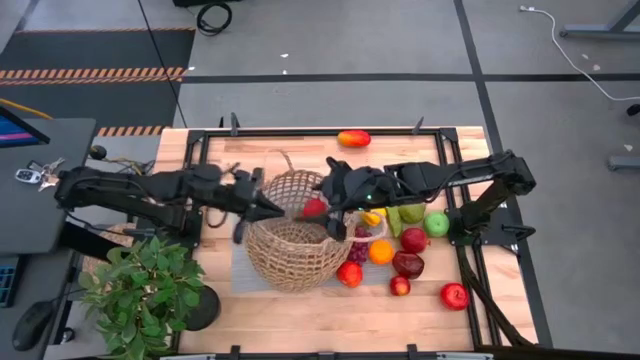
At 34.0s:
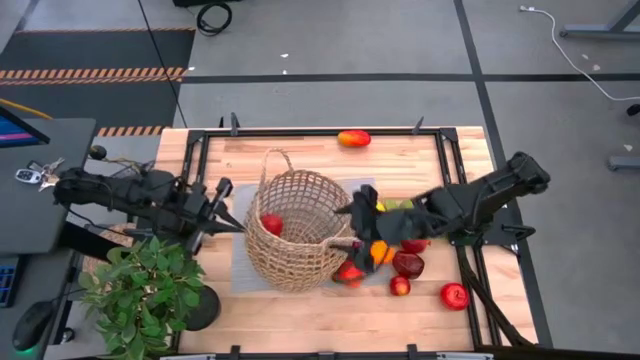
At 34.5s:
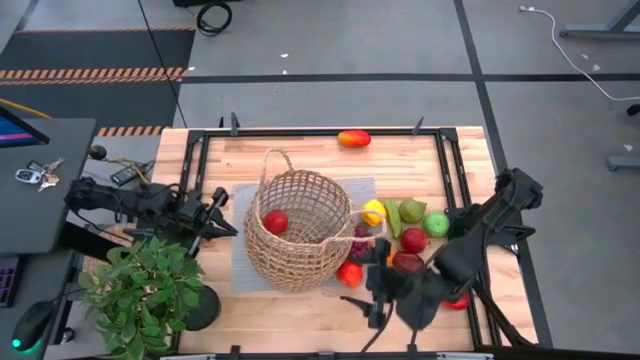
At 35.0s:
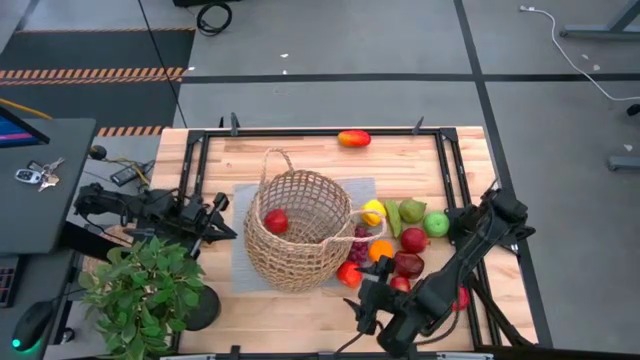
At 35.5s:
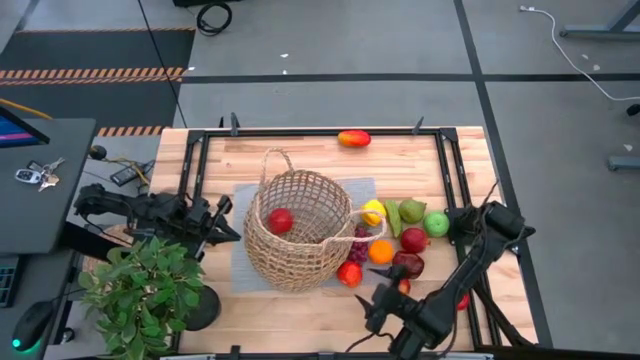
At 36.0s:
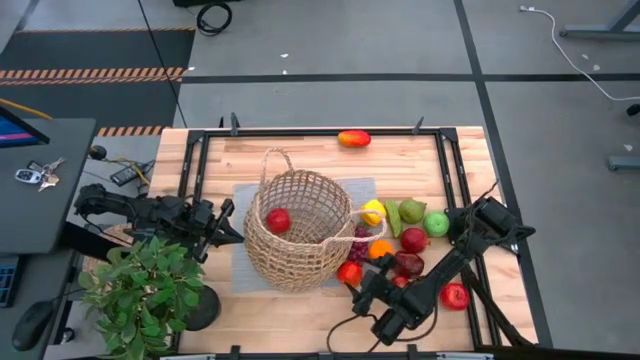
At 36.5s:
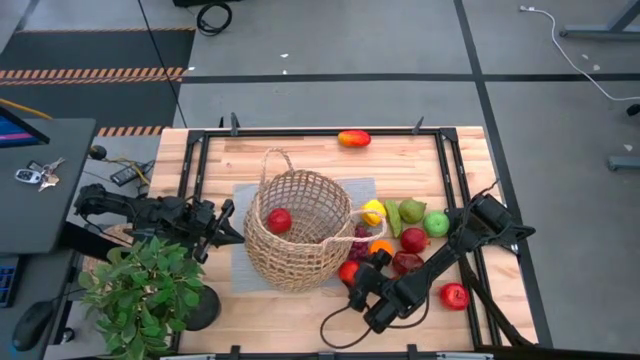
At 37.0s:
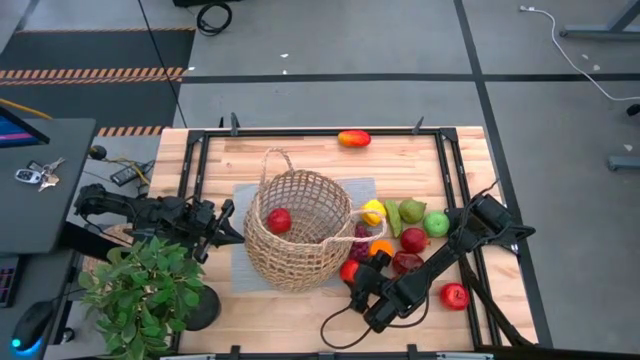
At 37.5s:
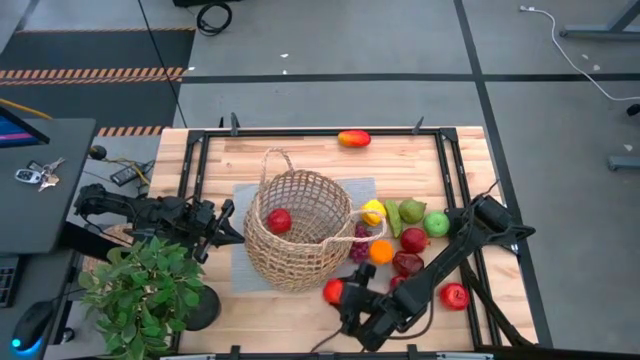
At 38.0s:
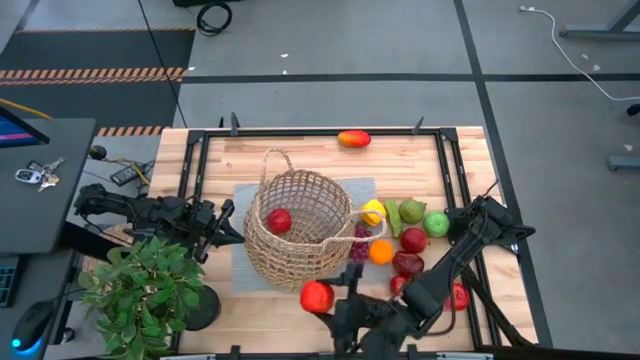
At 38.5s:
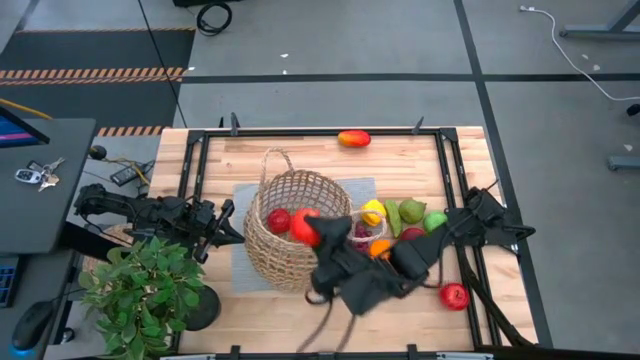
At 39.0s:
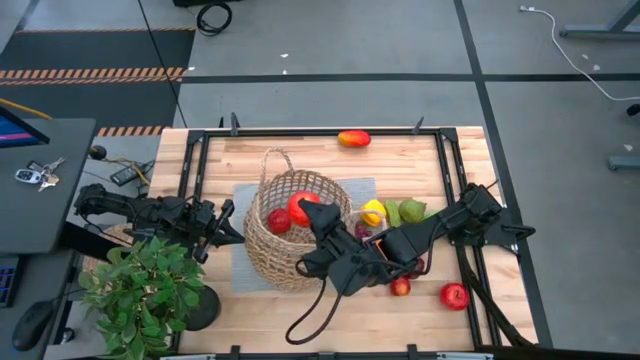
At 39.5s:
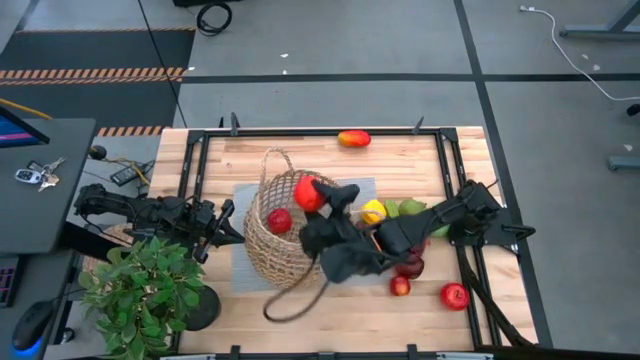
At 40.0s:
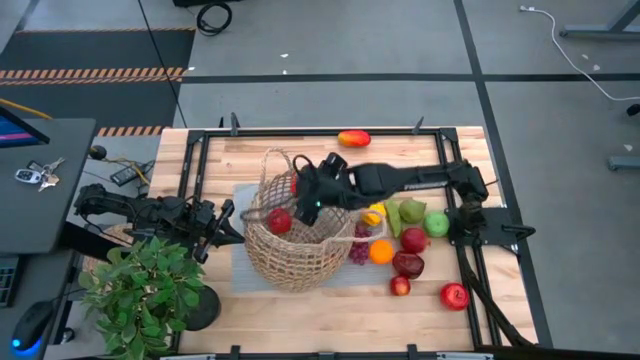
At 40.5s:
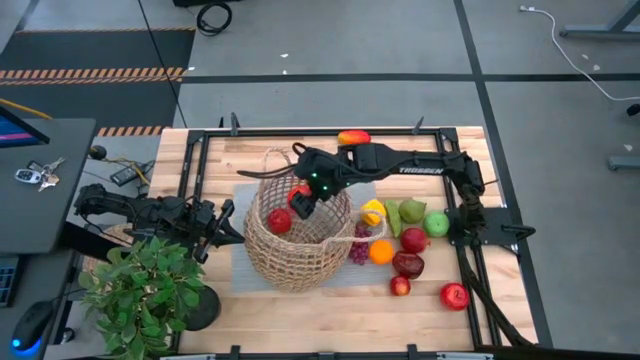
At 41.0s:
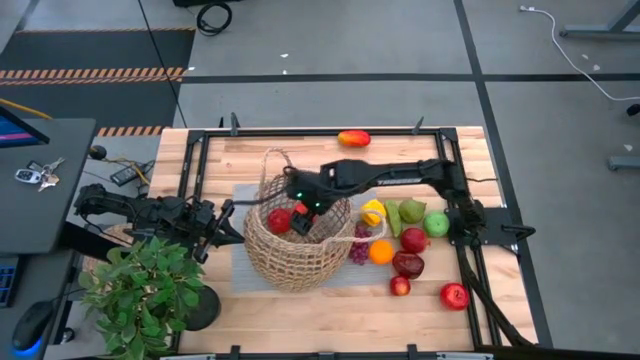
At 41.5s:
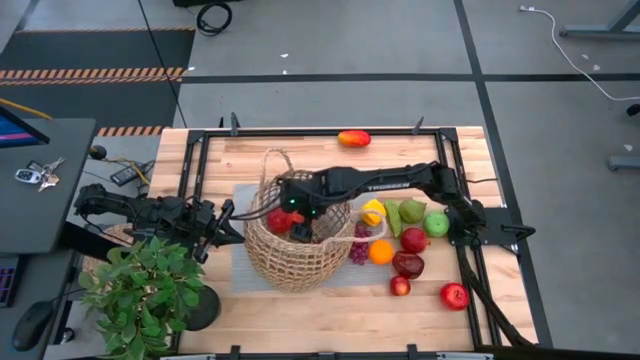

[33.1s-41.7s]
Task: Build produce basket
Put the left red apple into the basket

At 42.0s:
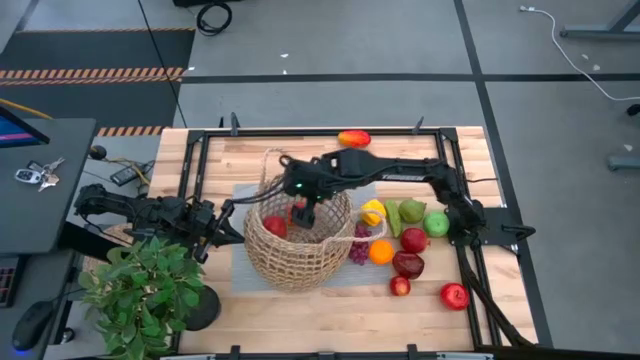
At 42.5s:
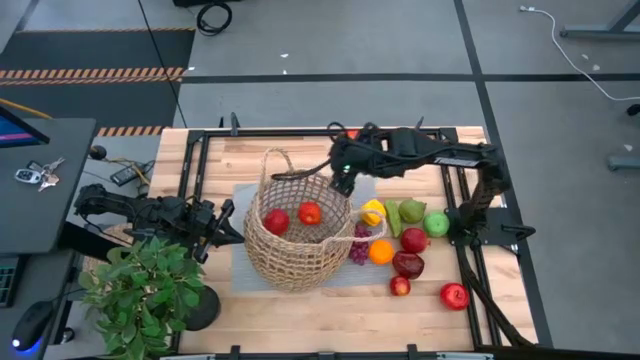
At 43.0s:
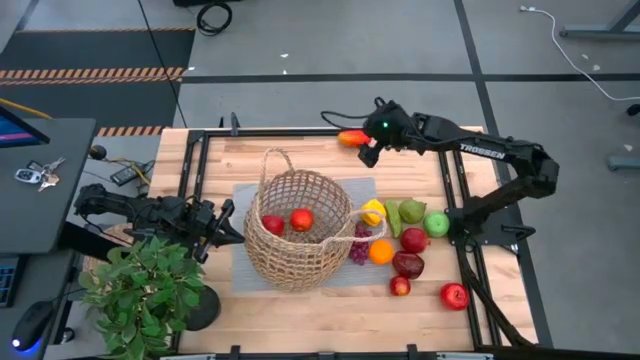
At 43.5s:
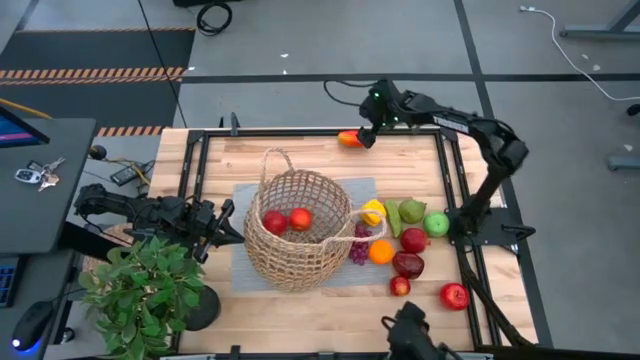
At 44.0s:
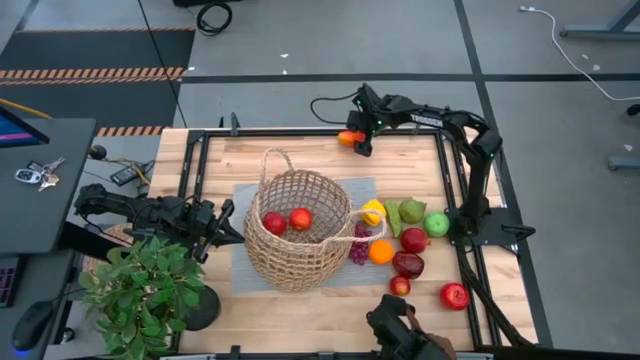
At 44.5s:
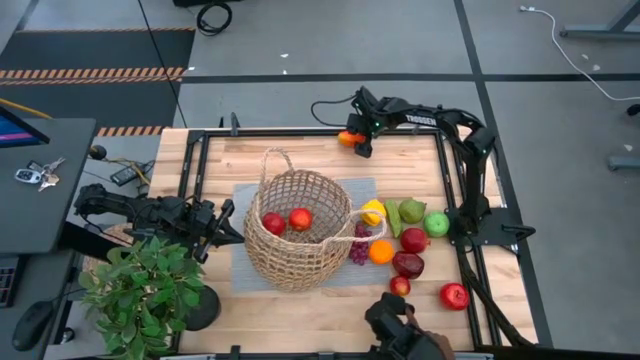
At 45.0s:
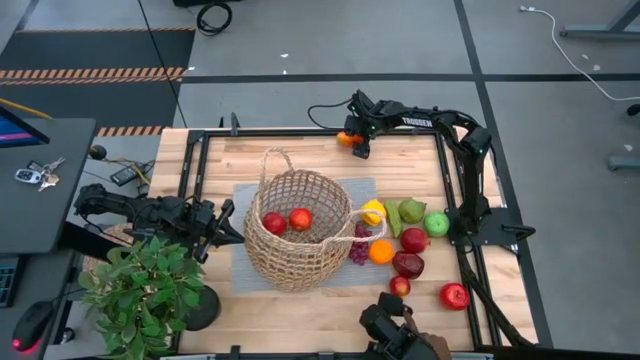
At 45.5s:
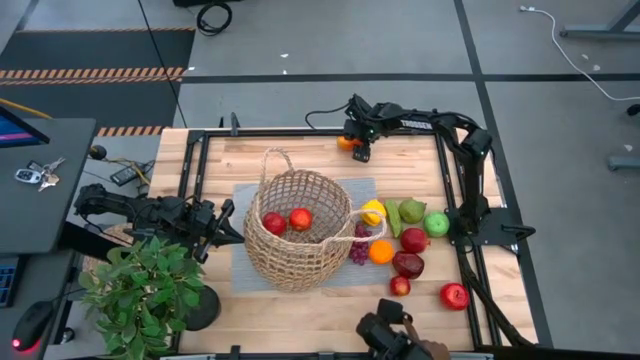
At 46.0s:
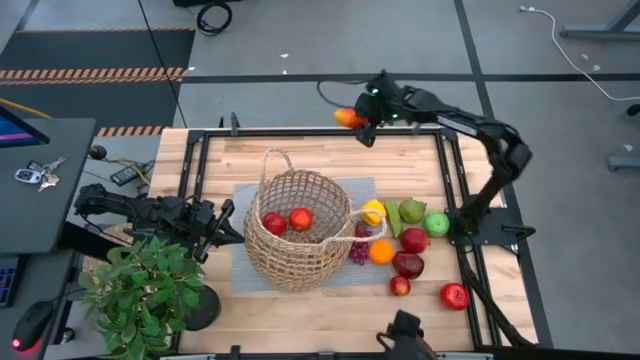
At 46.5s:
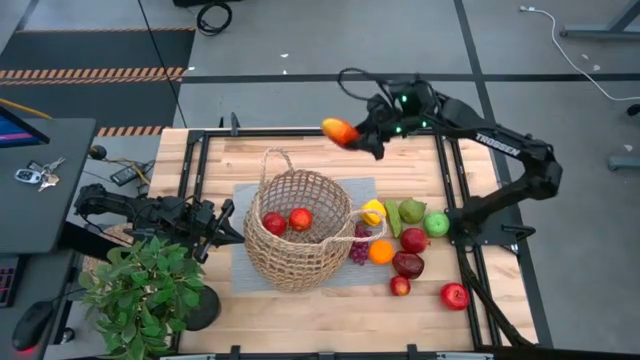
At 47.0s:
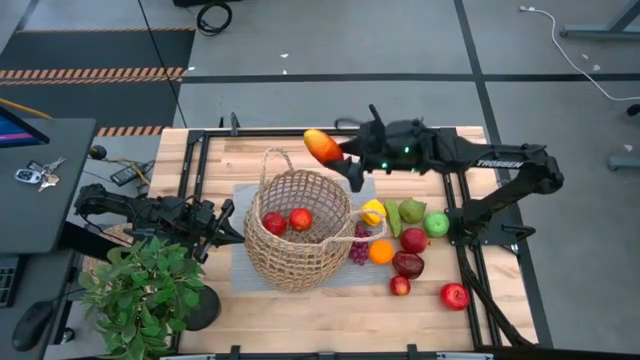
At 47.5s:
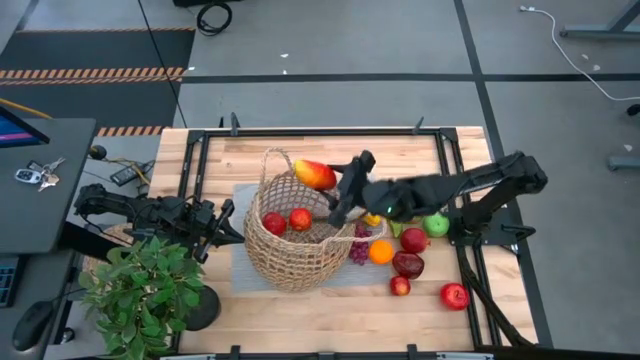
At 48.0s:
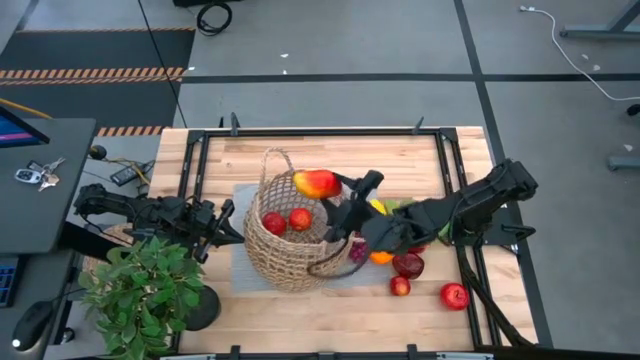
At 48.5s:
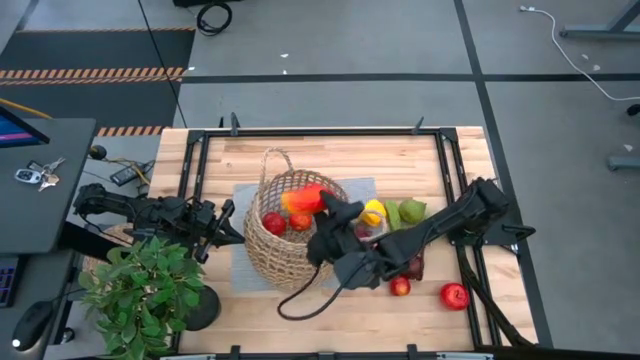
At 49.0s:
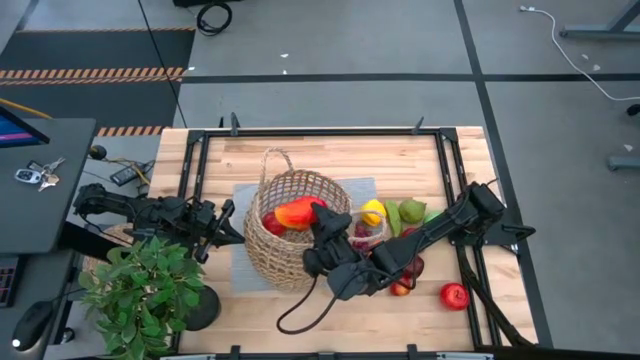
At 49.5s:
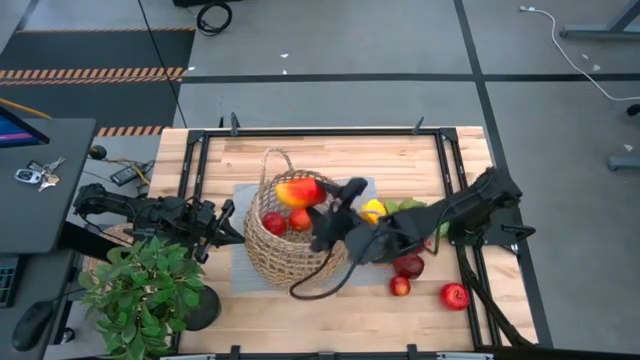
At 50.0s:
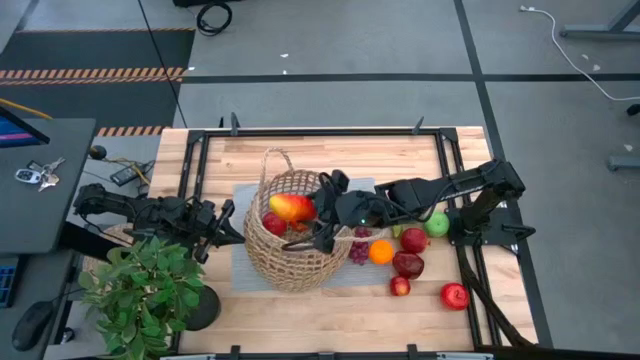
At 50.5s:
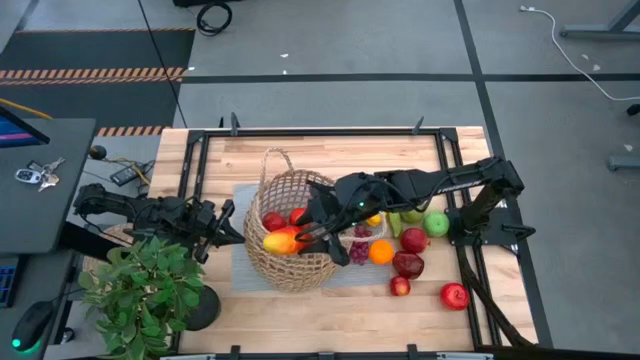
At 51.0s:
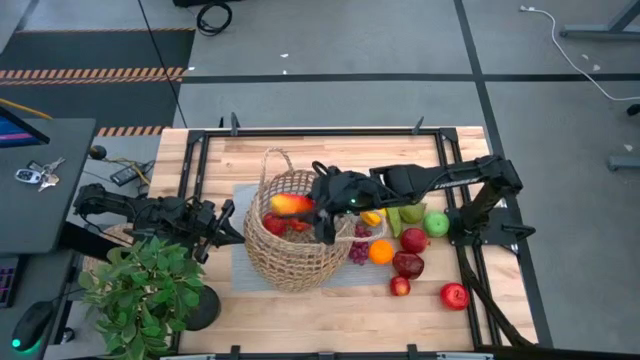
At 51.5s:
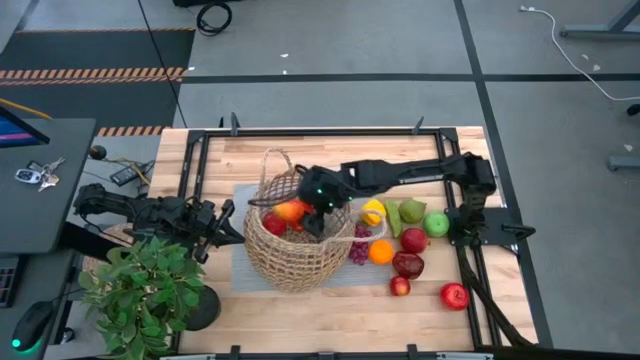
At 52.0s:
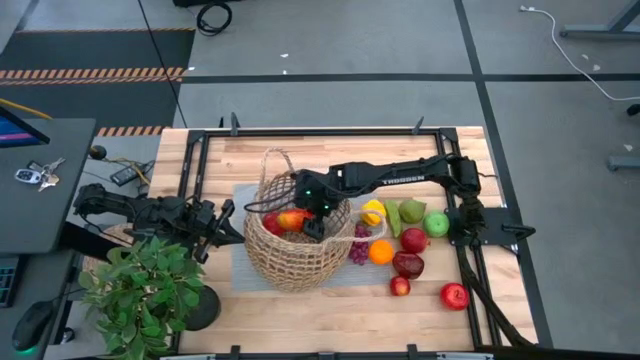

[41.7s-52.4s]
Put the orange mango into the basket
